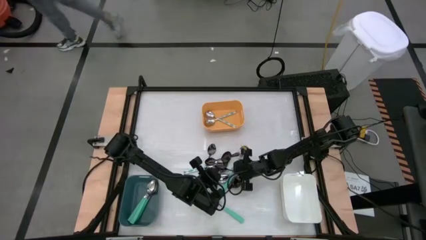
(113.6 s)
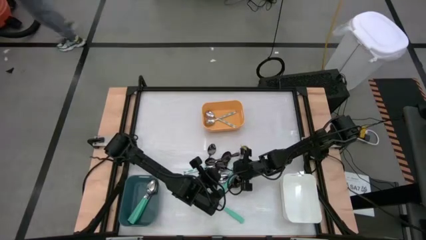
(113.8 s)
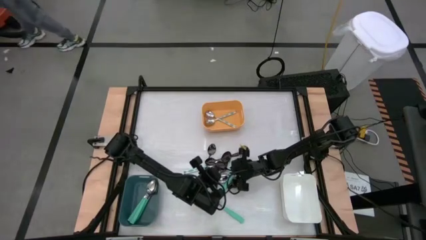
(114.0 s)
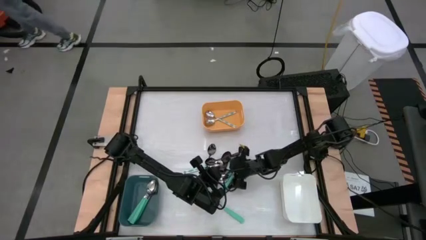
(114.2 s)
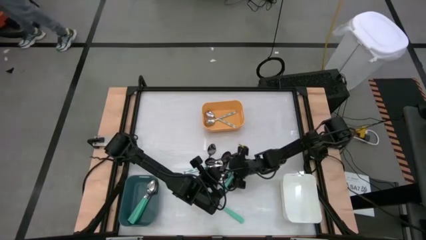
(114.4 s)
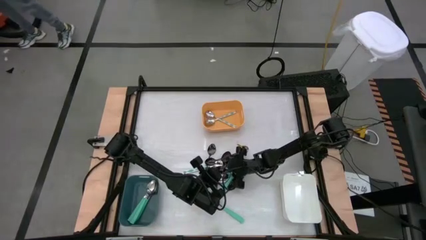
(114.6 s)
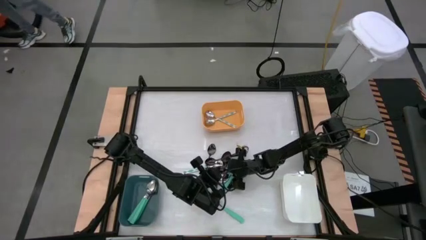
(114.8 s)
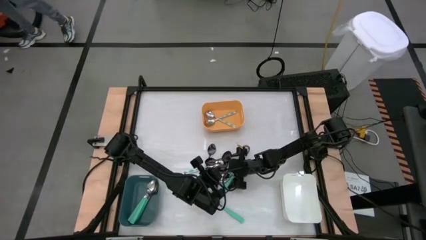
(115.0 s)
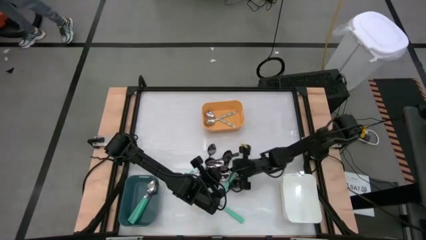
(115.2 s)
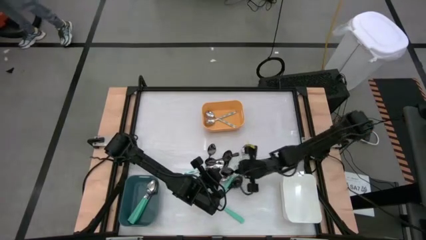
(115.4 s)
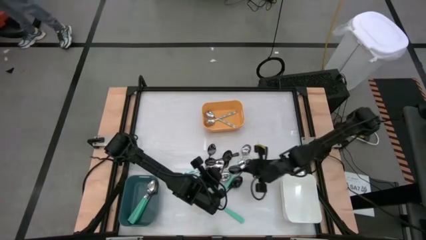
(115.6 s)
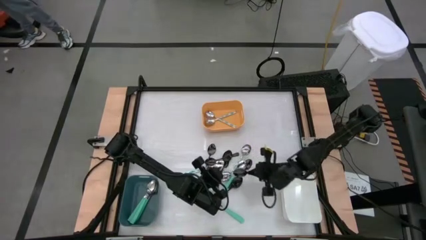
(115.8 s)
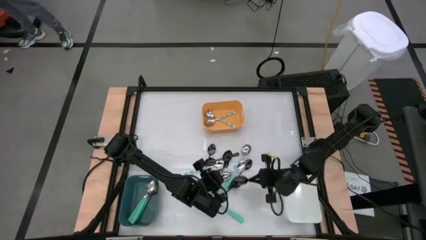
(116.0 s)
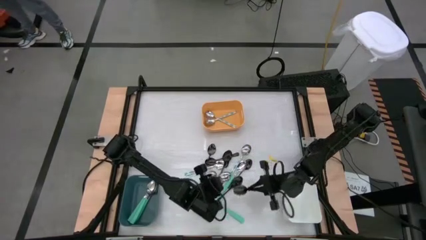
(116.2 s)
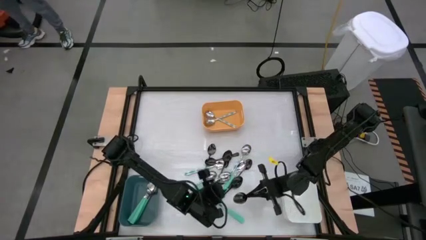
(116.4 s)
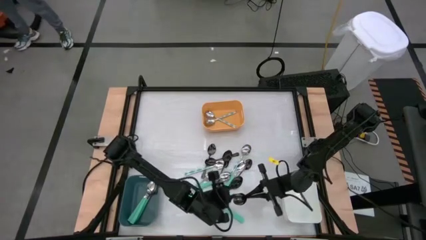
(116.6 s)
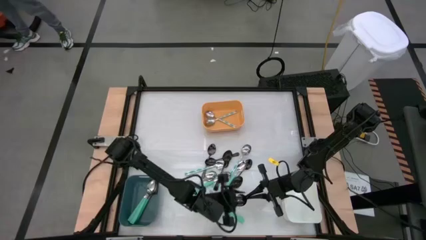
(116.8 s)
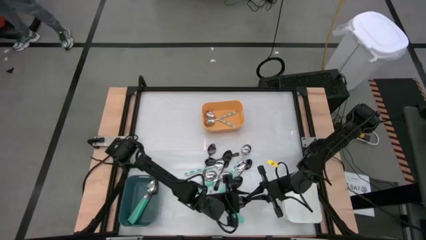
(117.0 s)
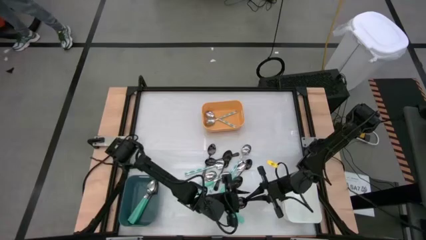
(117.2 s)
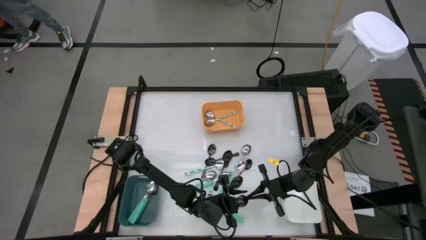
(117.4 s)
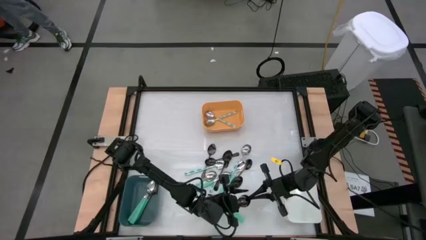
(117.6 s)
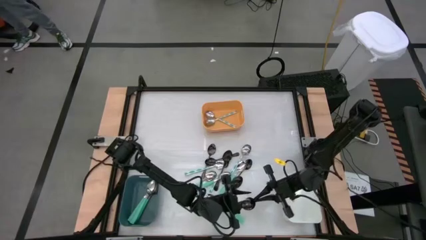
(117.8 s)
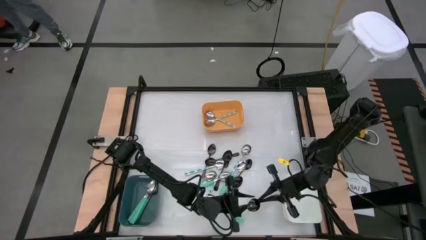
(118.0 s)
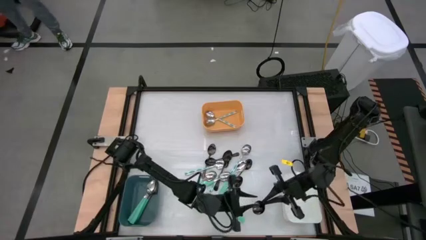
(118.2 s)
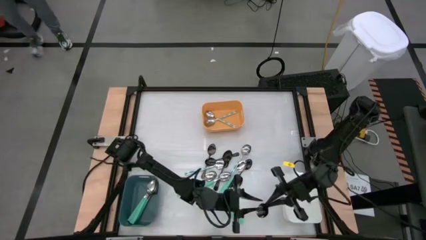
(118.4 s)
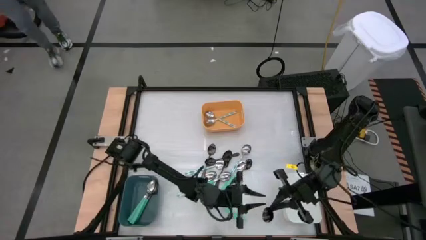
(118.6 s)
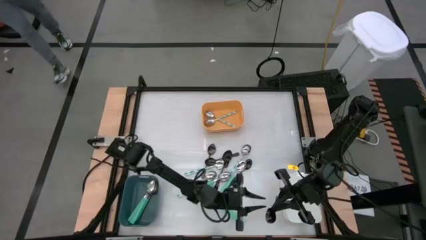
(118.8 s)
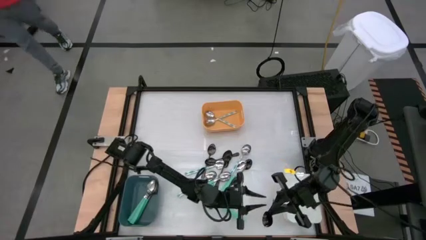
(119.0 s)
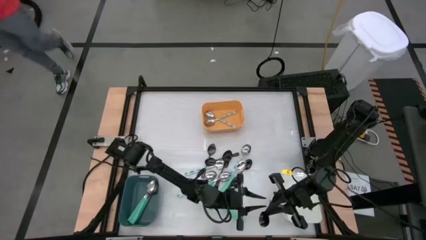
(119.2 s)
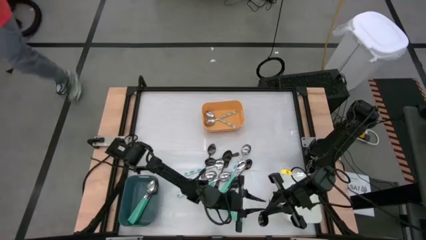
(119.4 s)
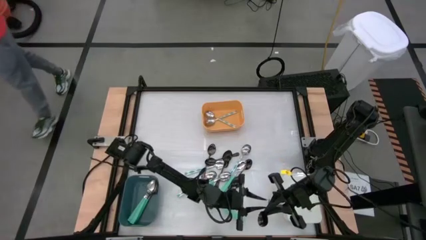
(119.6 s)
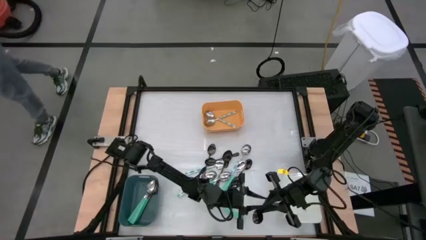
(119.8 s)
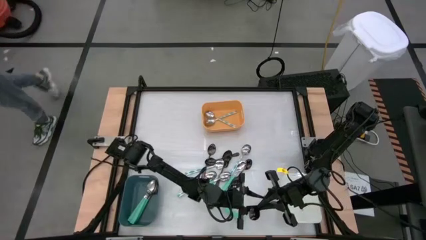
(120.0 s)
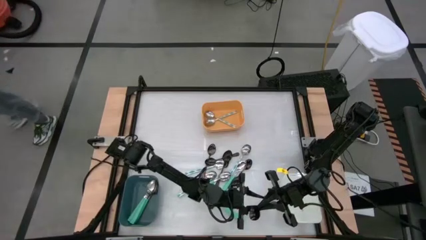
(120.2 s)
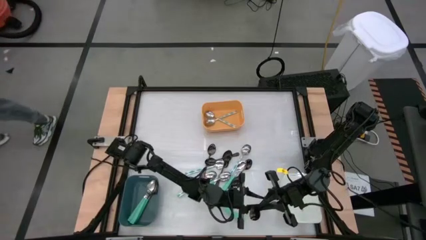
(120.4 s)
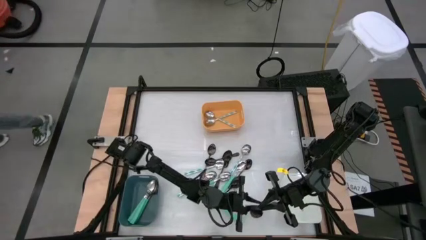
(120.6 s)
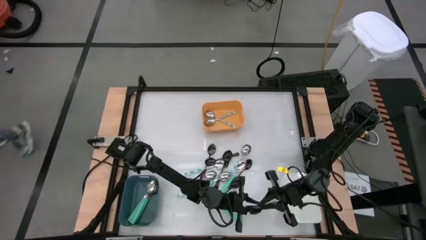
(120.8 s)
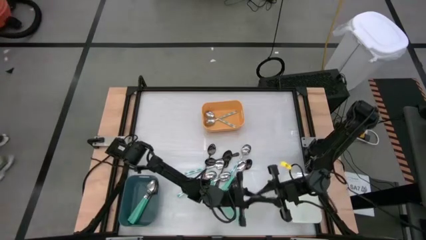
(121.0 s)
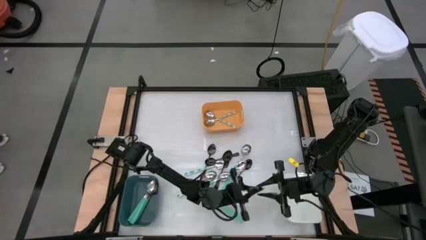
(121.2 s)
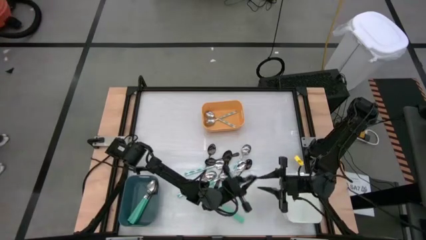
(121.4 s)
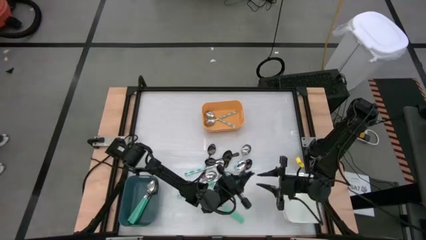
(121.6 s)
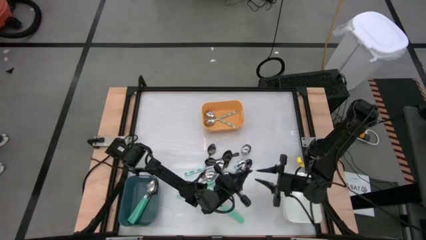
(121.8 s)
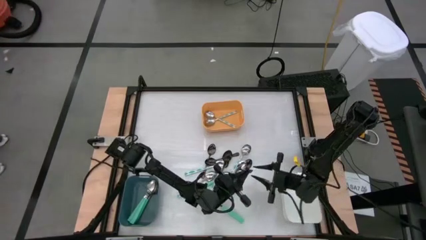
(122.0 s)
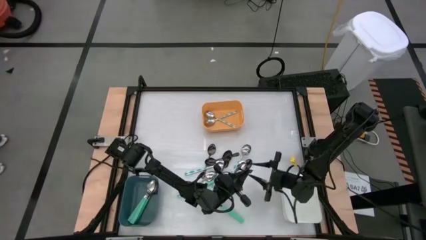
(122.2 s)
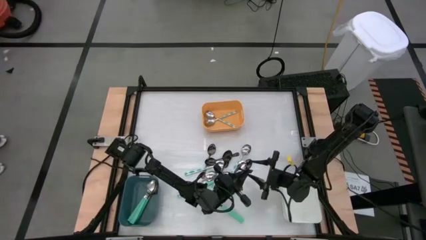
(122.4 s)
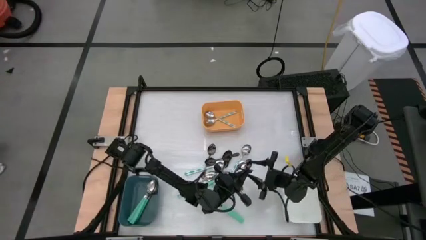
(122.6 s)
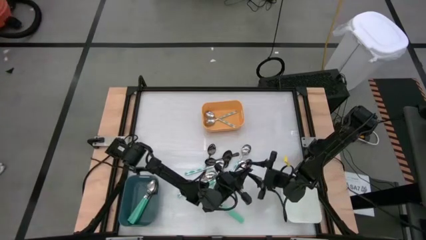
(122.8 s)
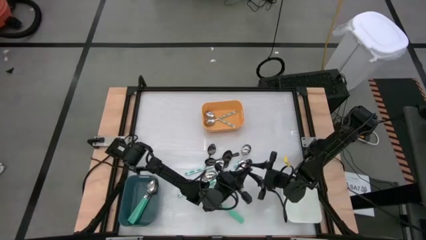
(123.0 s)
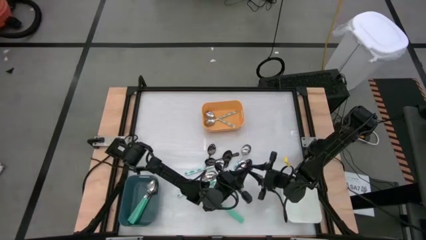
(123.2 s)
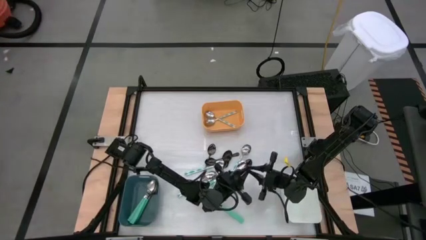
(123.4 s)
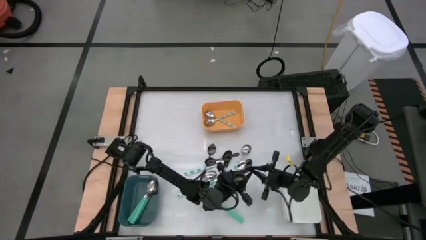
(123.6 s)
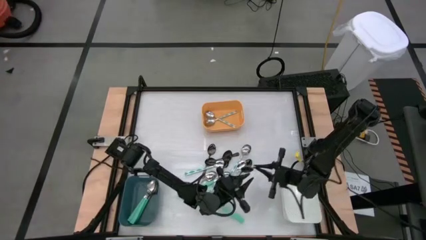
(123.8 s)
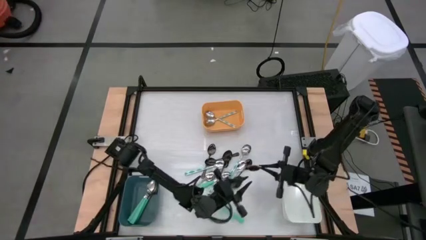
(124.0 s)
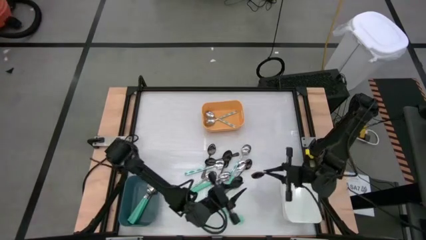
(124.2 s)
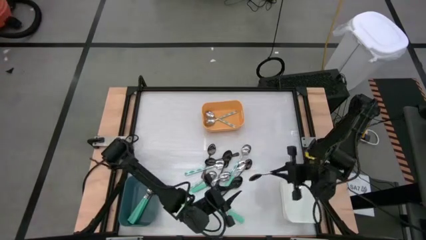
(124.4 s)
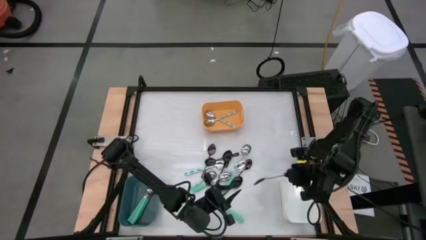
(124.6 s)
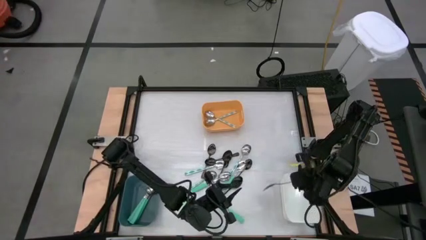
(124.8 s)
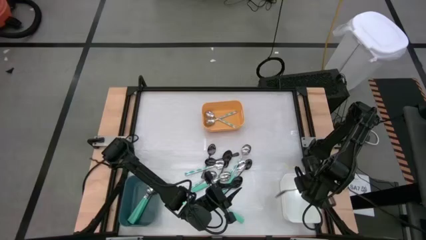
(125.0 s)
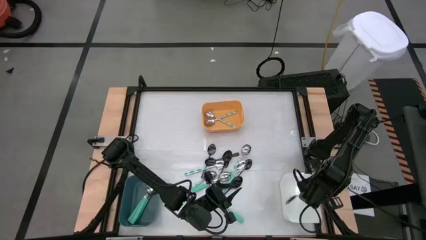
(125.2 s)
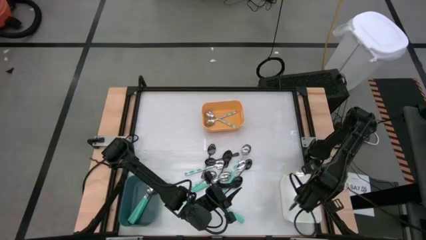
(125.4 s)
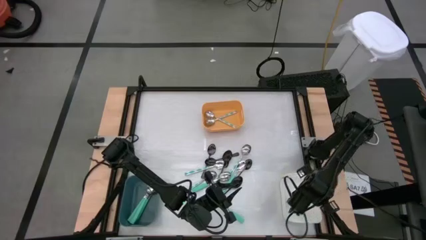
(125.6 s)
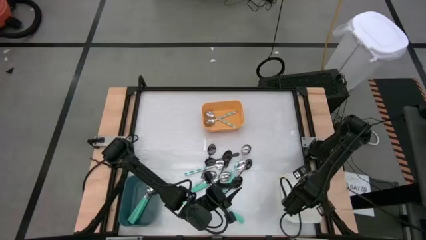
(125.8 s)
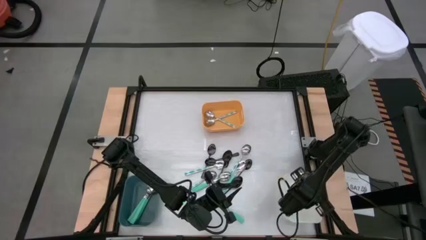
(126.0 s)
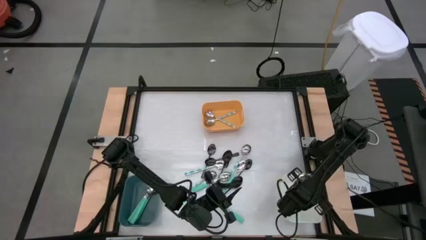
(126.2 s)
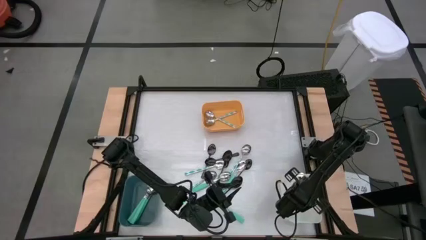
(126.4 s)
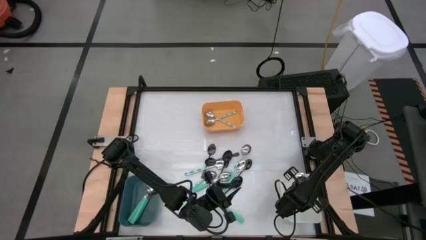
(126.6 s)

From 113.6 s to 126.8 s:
Task: Sort silverware by color (type)
Put the black spoon into the white bin
